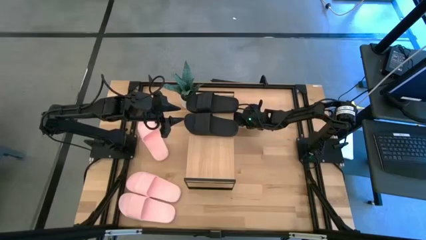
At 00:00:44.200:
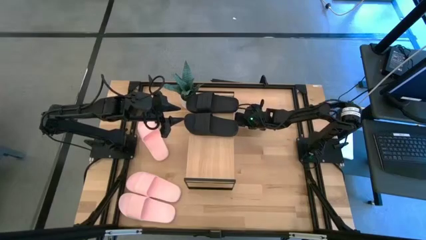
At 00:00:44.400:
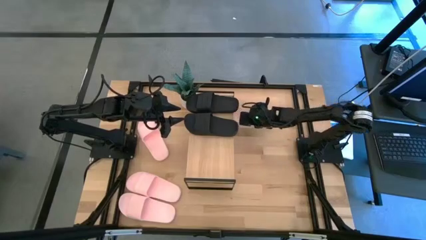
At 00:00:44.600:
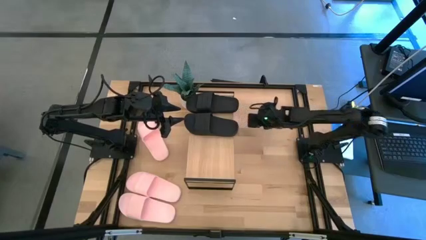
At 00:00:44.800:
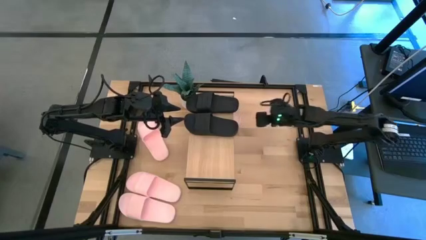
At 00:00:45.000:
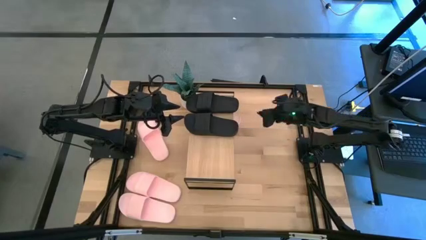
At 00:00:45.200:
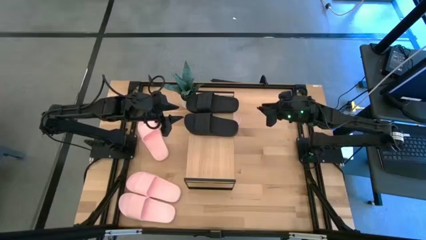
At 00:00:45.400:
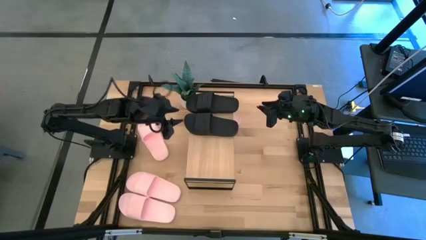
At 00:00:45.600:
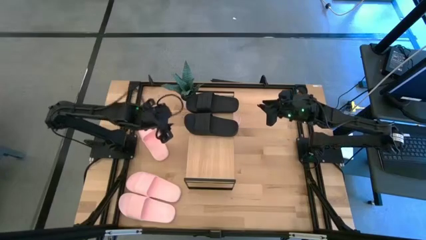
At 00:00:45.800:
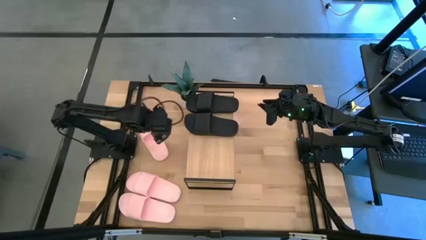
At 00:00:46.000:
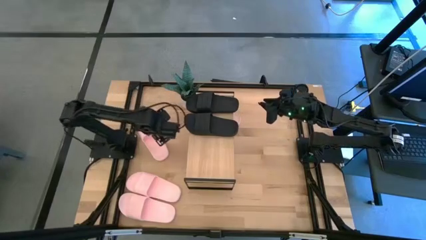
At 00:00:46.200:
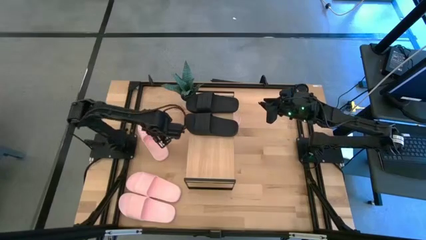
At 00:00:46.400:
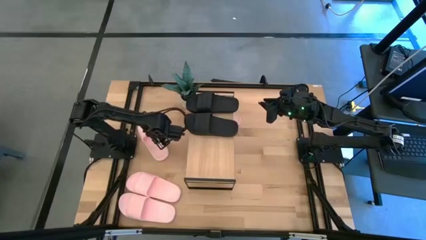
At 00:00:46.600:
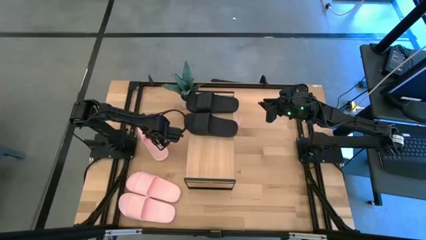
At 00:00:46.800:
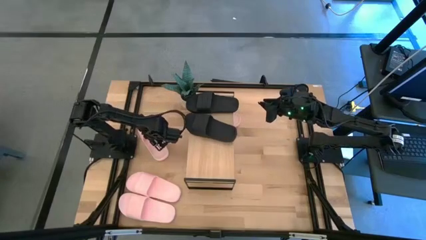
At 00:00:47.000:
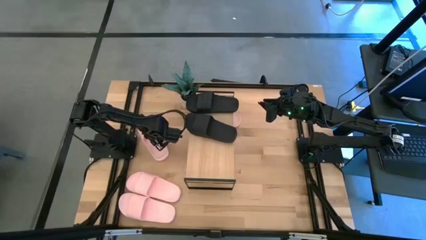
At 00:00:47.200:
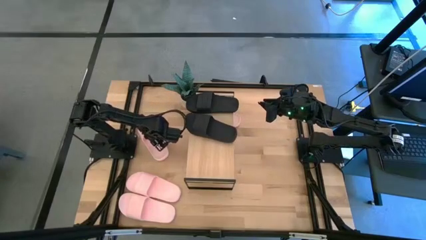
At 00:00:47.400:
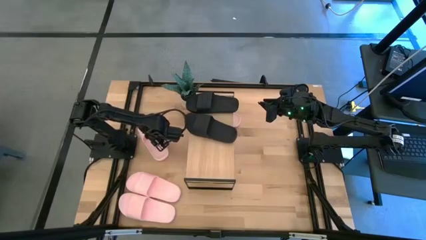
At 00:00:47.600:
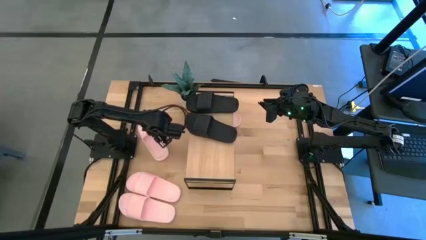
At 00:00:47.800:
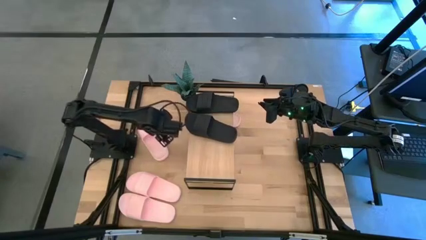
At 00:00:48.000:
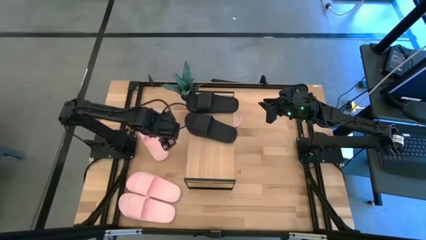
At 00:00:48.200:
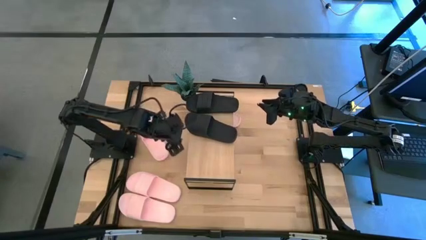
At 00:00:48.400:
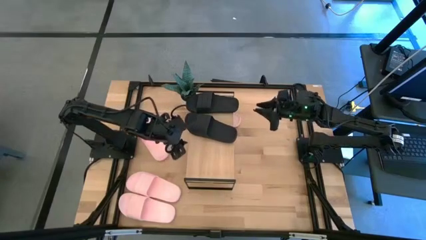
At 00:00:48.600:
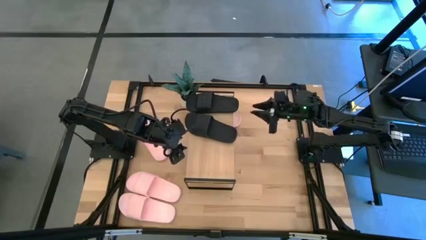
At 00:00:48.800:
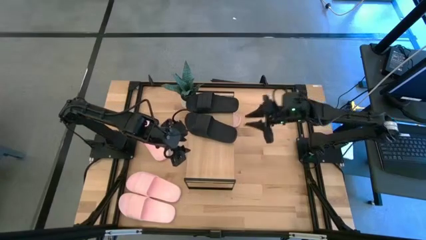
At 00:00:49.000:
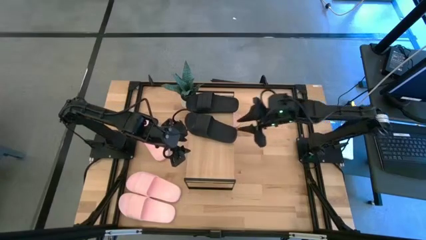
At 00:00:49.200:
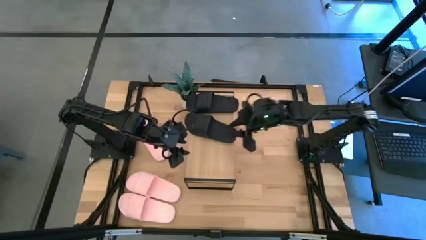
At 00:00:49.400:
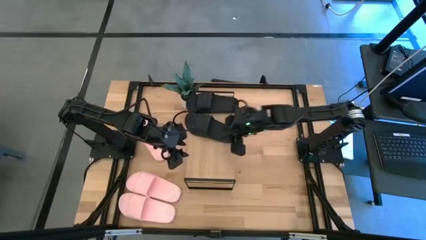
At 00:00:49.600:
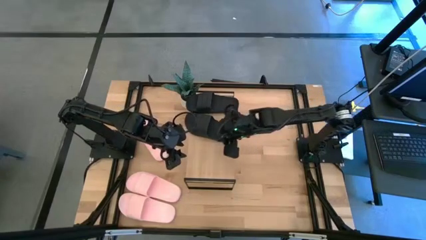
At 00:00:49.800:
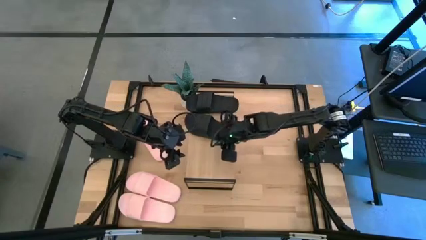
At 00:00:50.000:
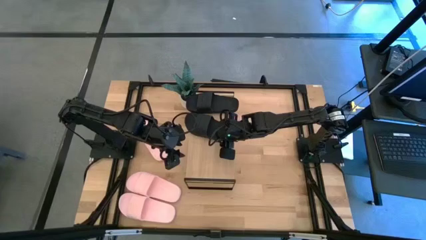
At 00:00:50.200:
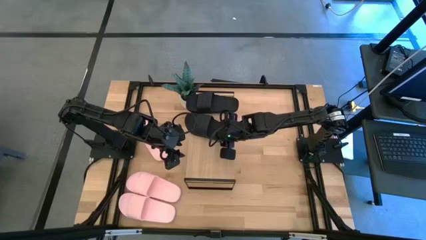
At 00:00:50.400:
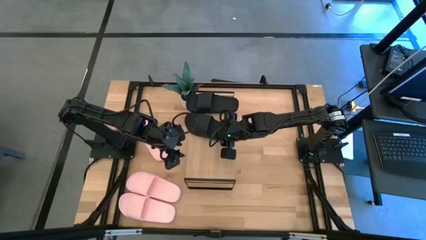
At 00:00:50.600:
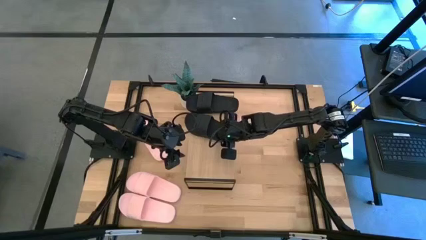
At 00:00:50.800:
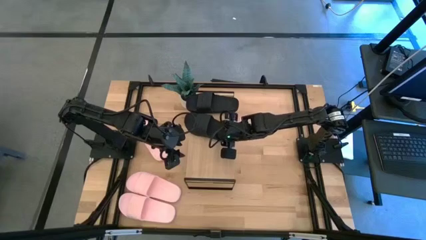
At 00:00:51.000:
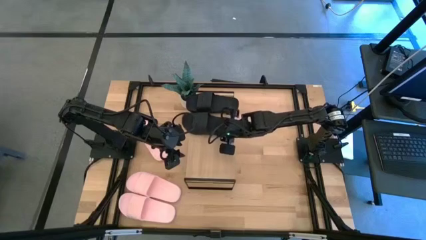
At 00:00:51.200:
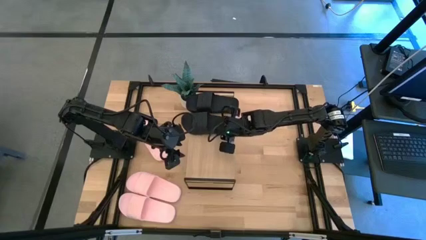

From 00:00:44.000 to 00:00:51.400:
Task: Pick and place slides into the shelf
Adjust the black slide on the shelf

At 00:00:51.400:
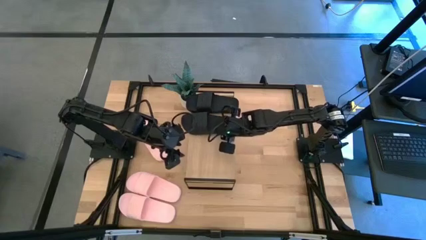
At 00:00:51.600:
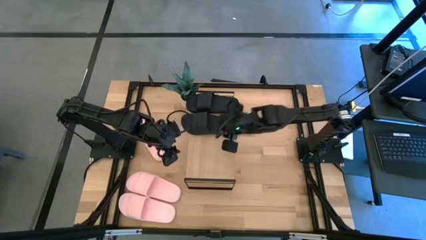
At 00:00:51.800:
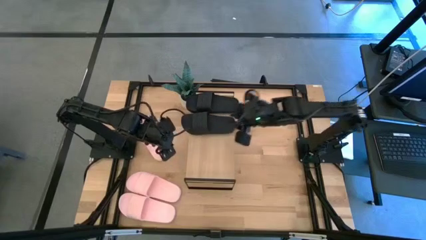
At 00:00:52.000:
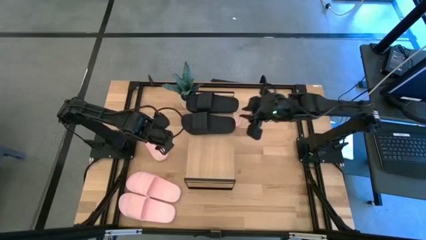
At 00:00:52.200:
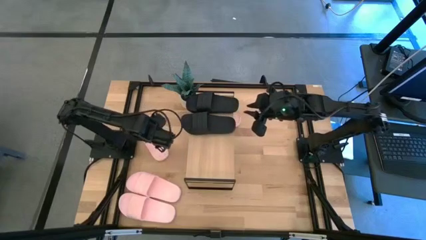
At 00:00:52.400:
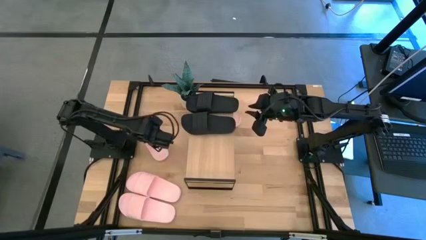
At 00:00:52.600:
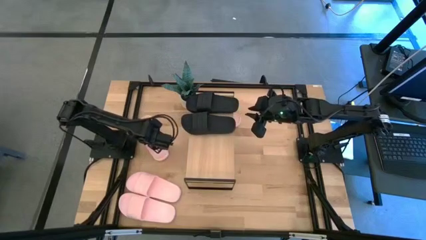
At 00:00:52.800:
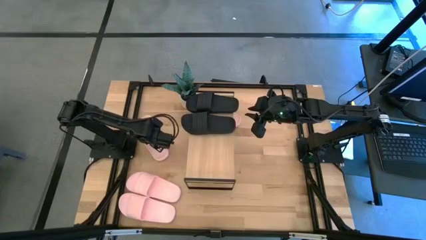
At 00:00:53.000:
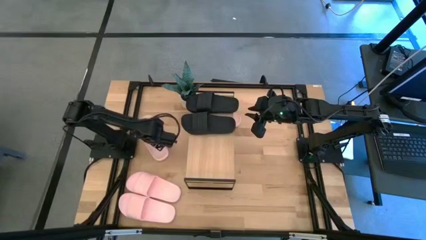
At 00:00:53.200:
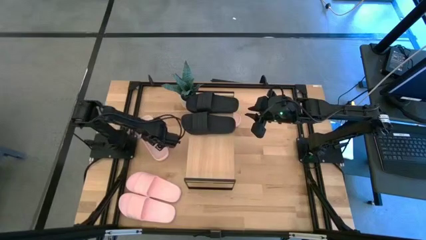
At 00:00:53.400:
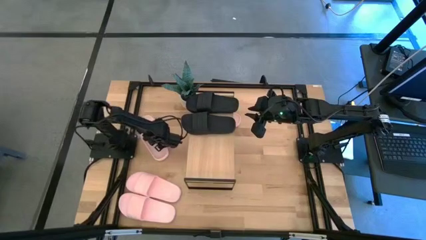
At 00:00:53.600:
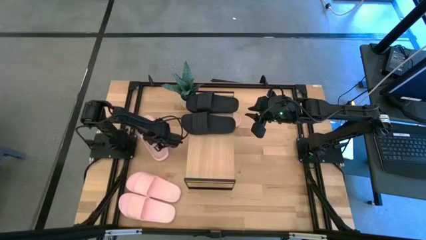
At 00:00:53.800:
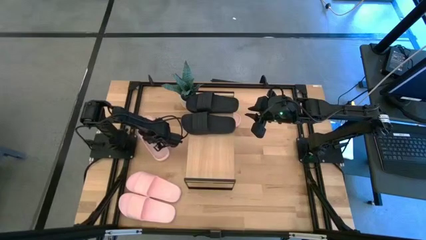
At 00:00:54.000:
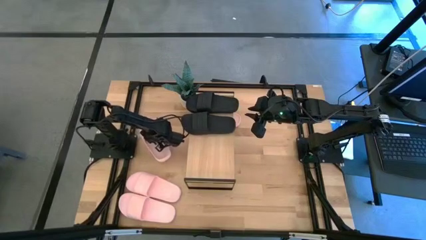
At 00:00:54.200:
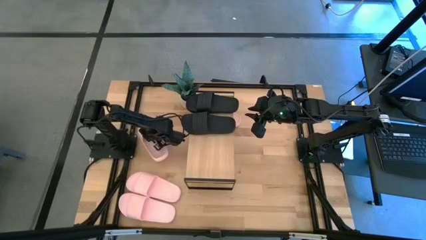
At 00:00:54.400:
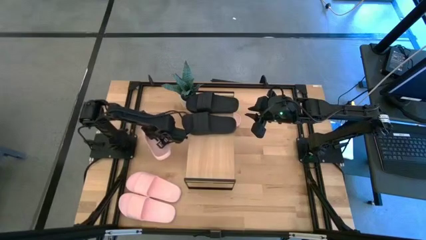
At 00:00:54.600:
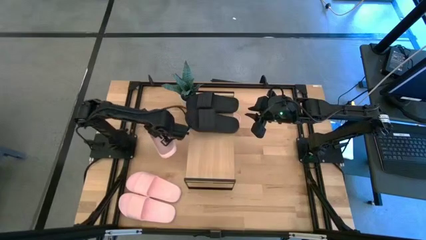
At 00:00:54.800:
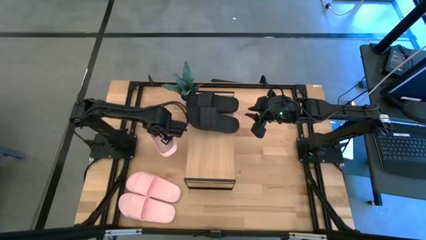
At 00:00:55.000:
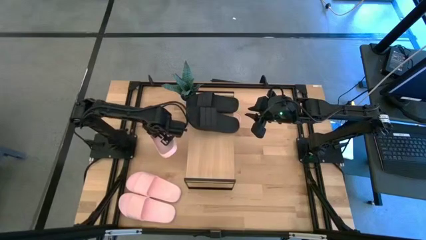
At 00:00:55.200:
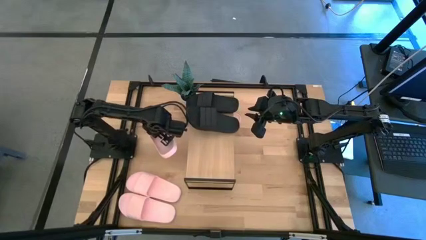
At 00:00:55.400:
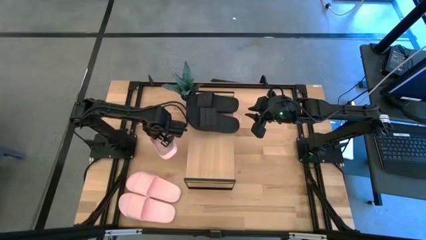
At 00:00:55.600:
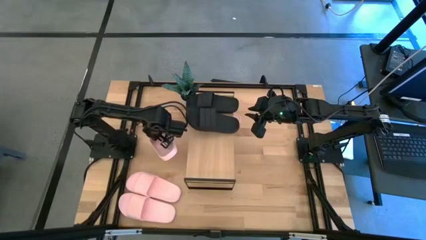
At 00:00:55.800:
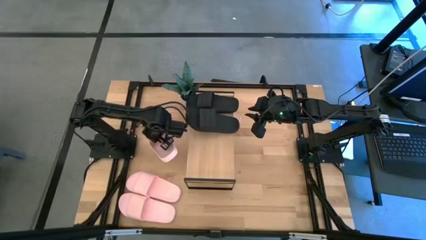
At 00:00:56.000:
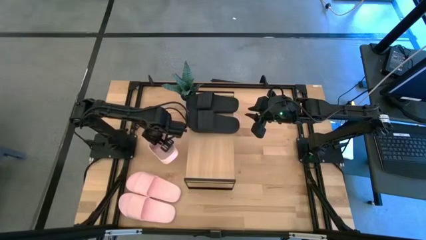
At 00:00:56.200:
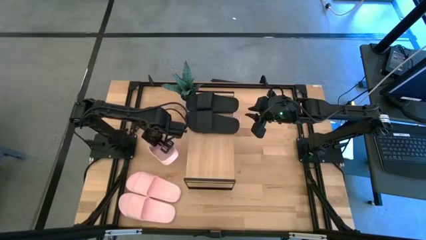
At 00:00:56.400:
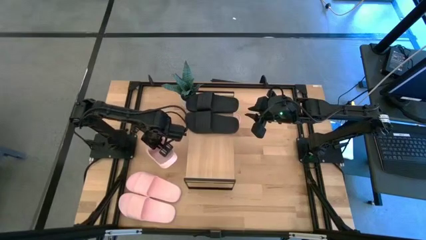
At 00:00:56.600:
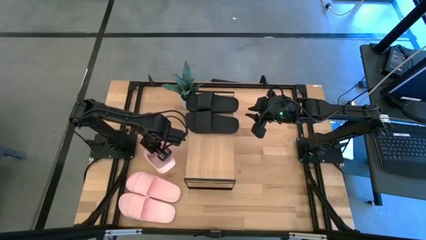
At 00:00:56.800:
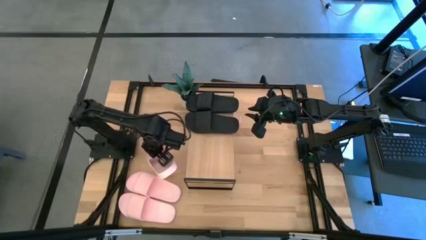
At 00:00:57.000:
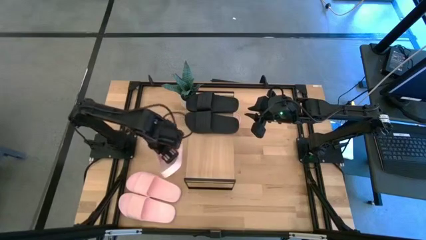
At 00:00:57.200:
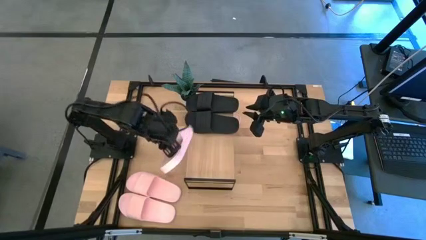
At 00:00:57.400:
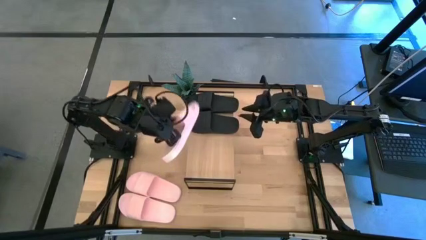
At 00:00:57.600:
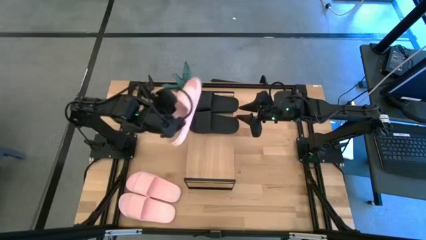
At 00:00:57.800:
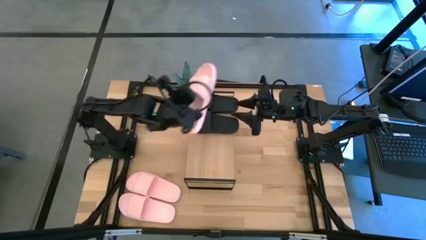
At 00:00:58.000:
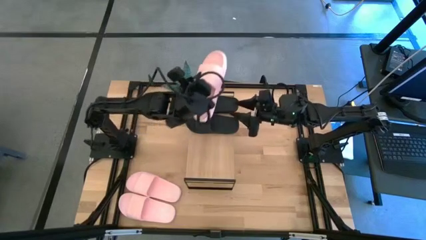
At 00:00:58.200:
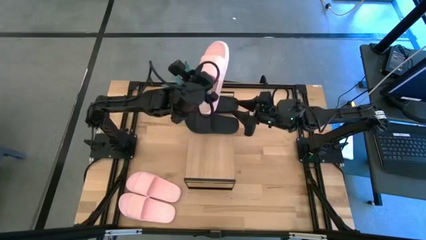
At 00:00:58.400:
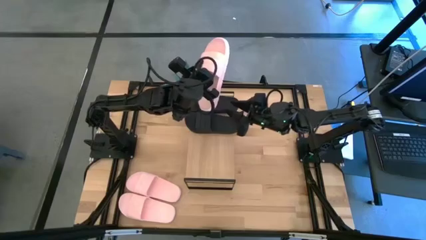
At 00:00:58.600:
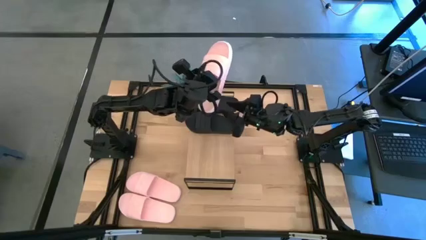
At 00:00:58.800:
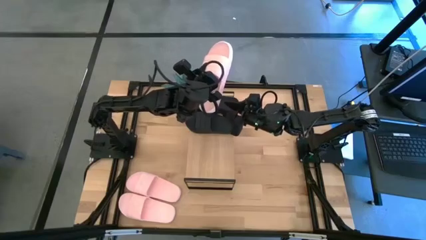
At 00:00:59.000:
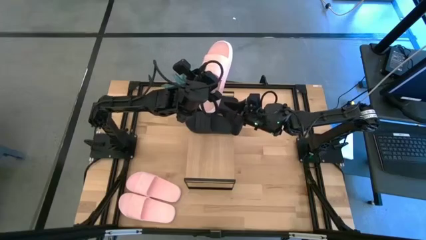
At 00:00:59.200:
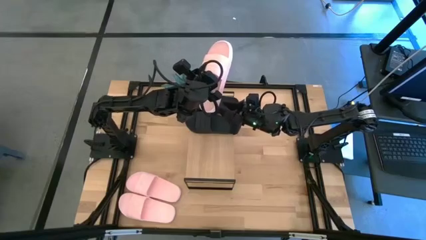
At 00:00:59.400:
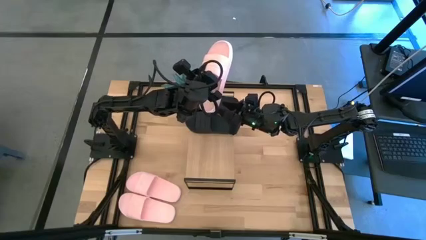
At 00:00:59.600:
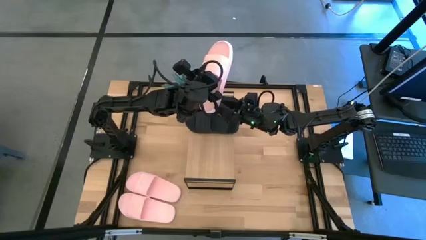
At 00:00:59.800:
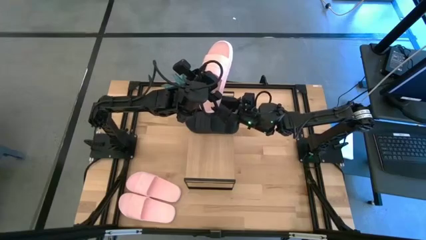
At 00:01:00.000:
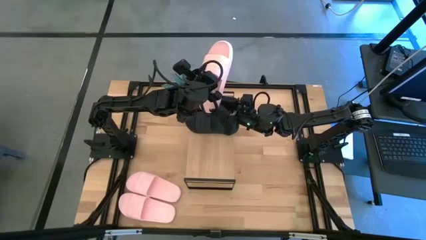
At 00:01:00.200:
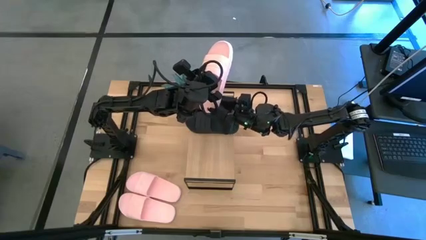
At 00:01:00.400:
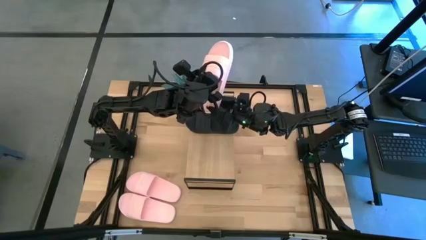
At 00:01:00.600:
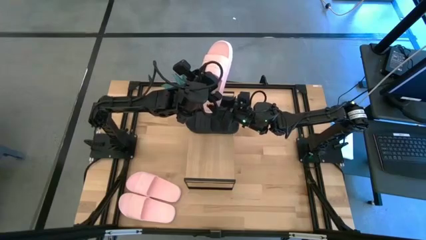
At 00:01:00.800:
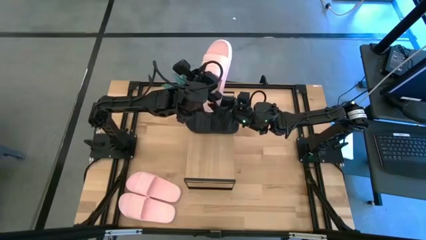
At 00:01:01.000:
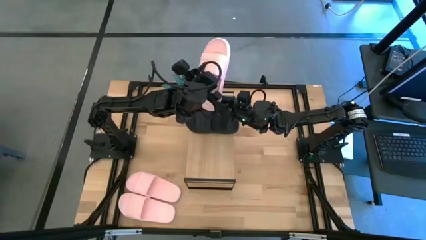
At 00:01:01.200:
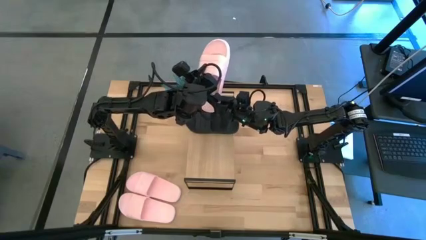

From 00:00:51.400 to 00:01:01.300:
Put the pink slide under the shelf
